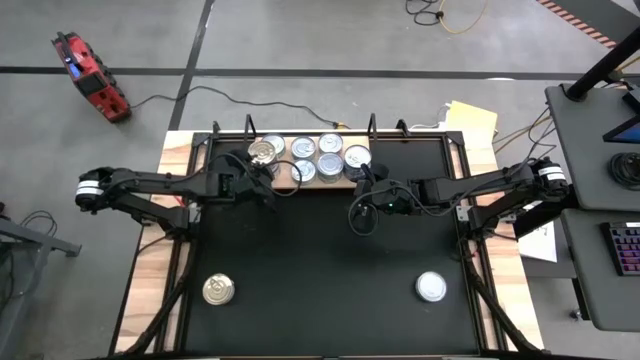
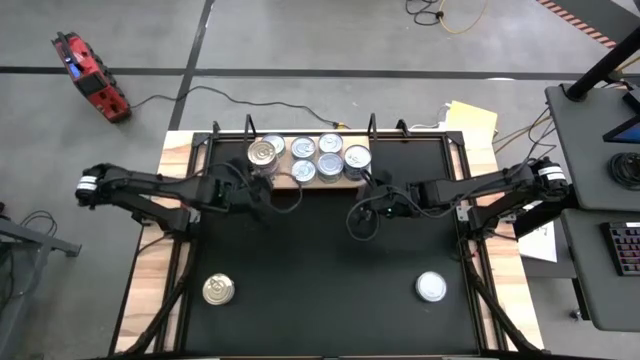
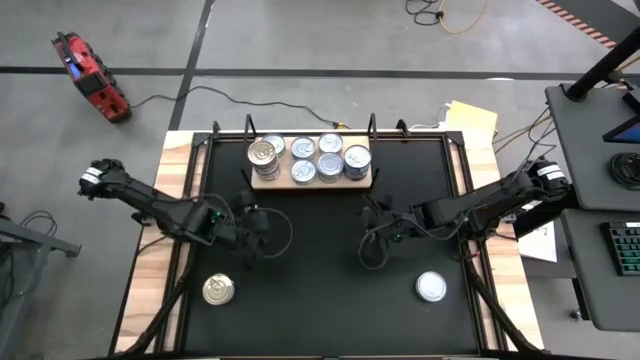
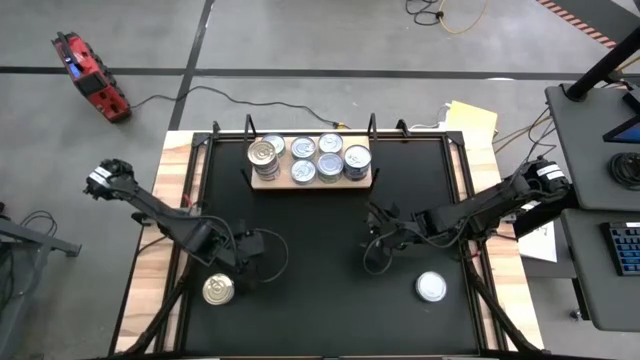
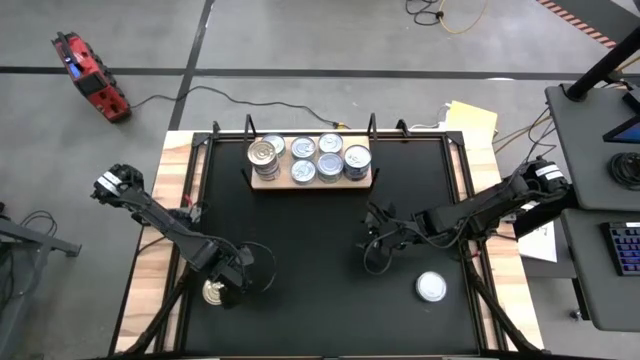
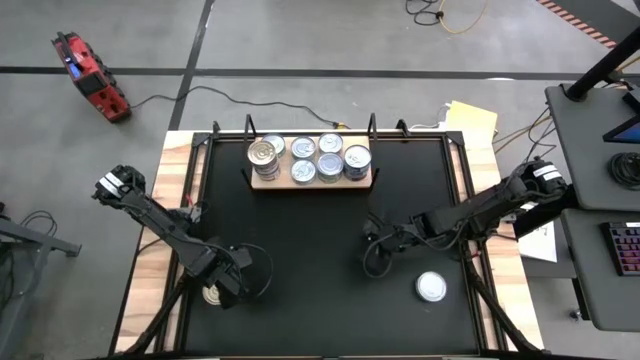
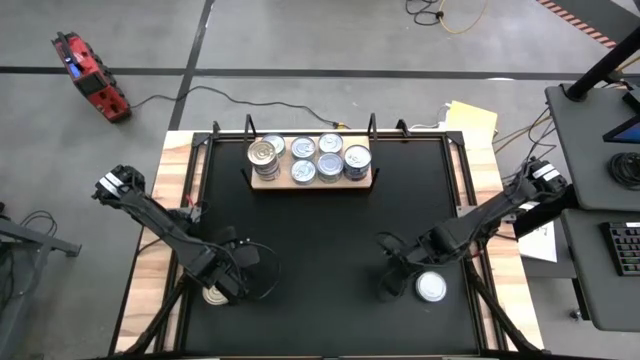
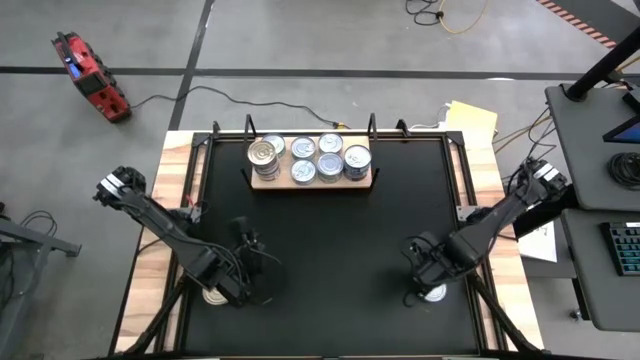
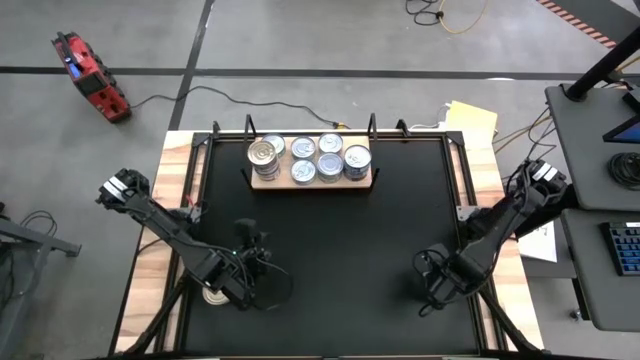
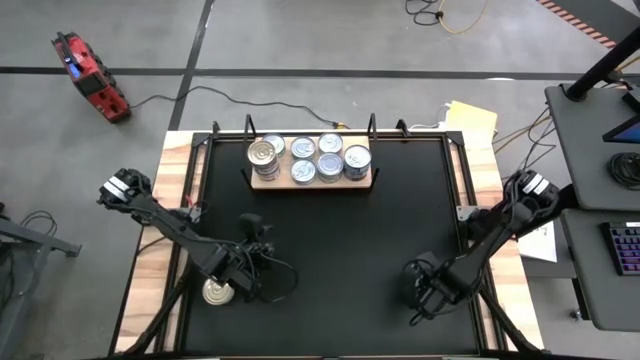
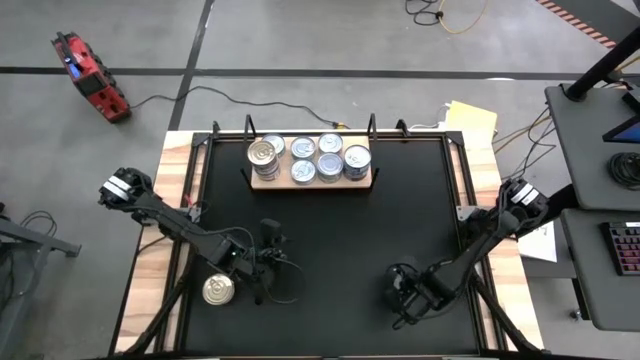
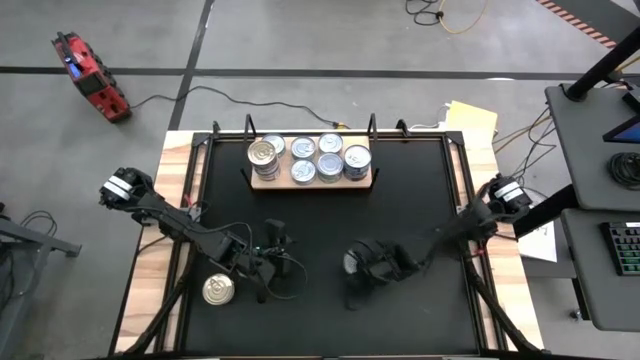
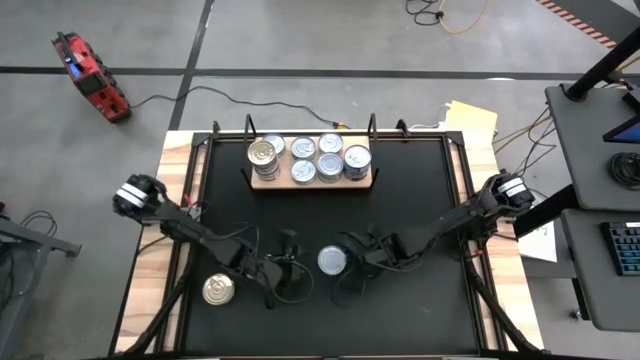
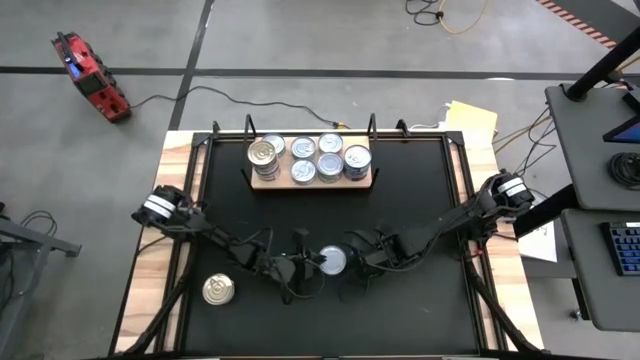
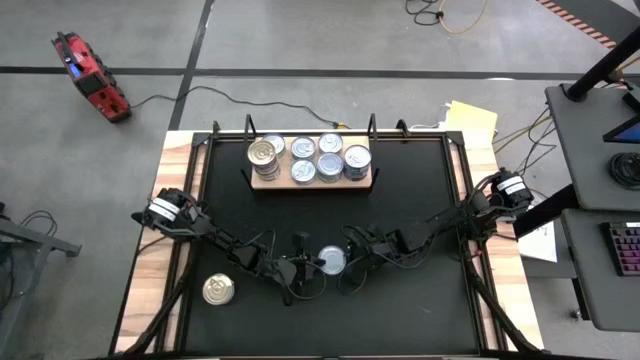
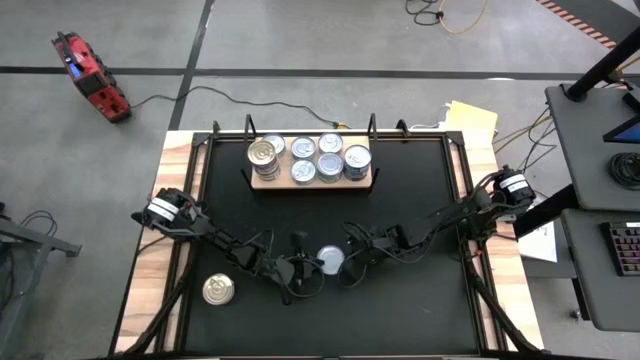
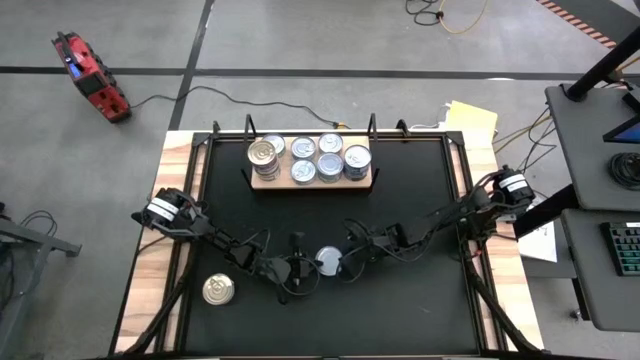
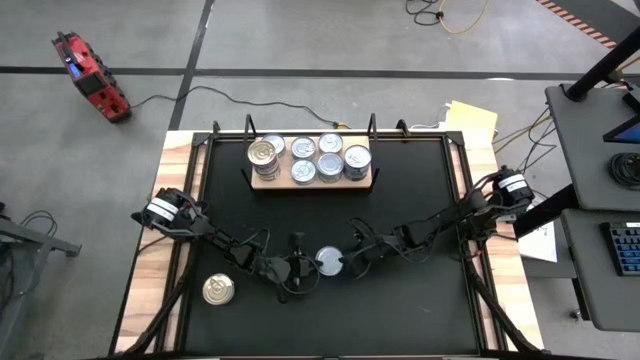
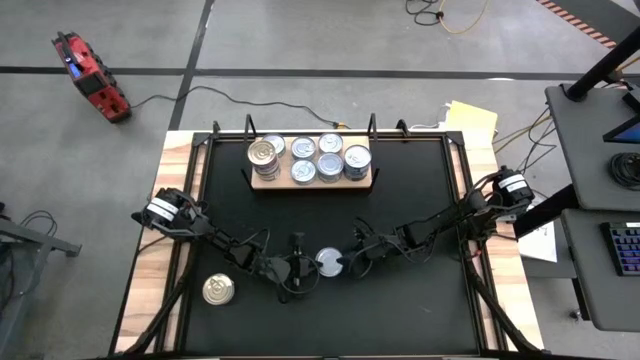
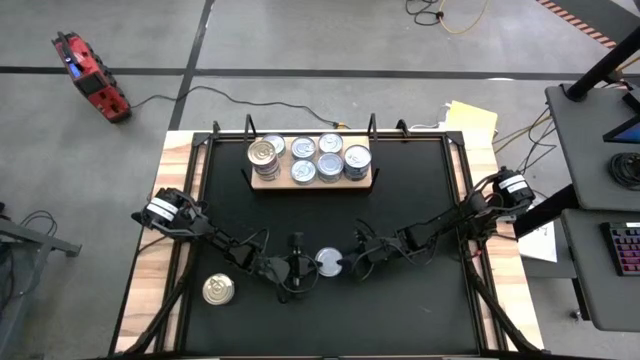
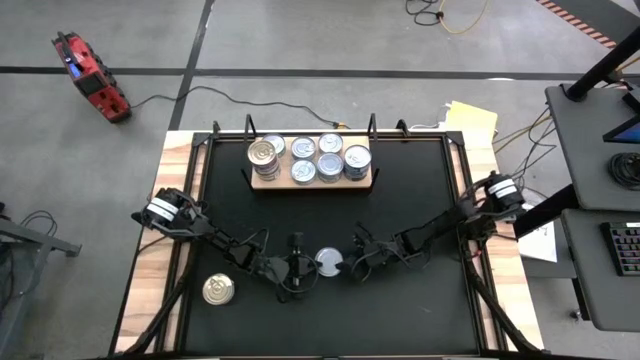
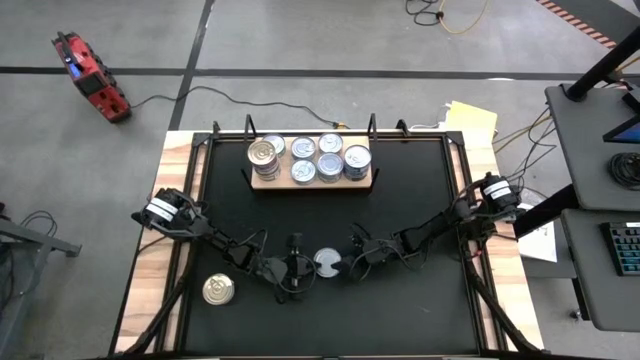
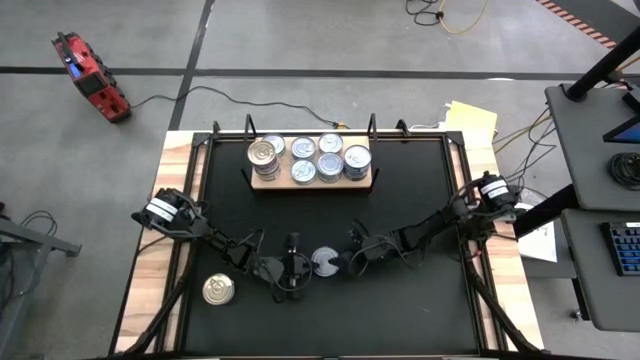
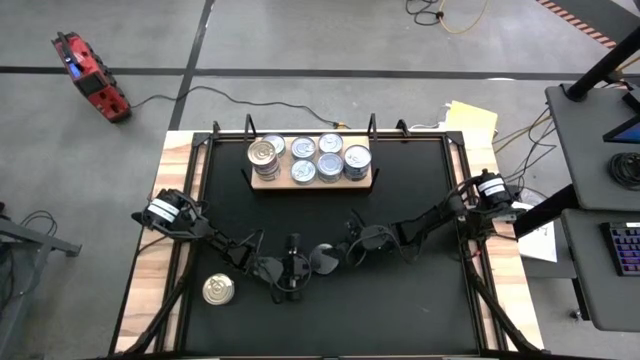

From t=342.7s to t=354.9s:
Task: Stack canned seafood by type on shelf
Stack the green tuna can on top of the other green tuna cans on the shelf

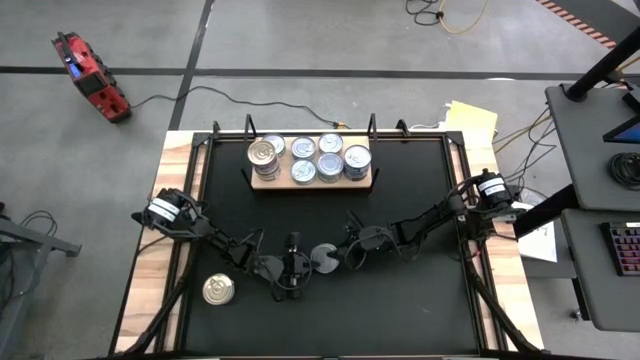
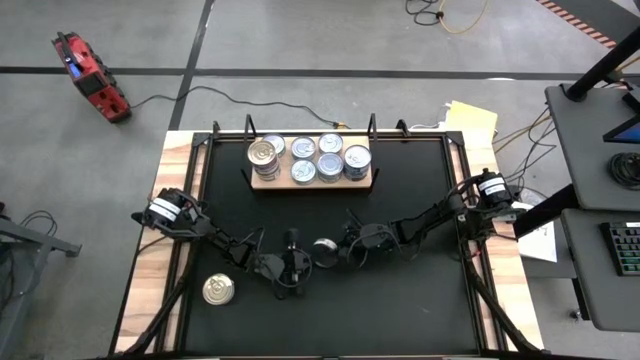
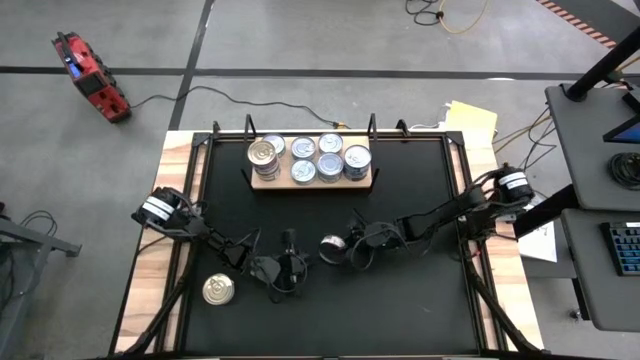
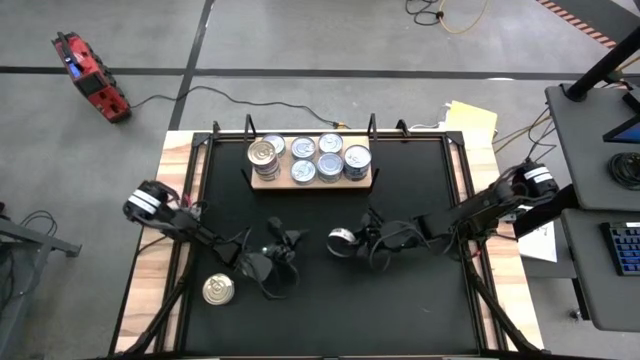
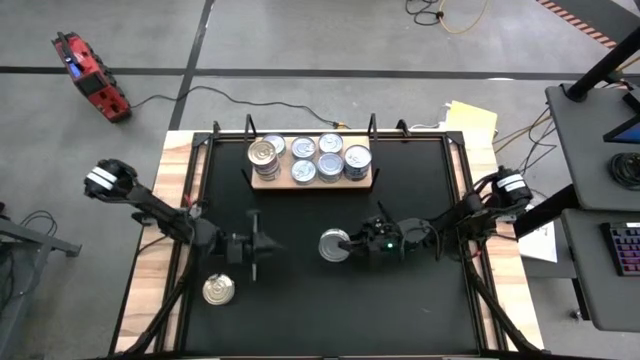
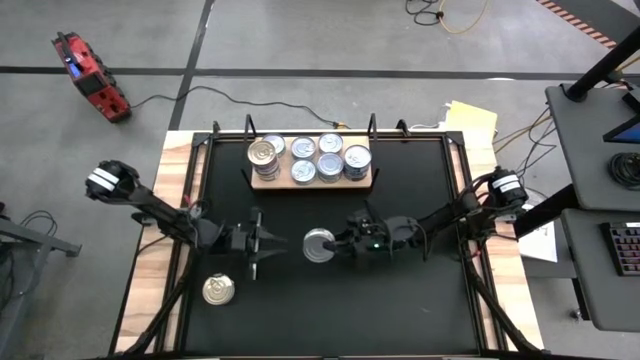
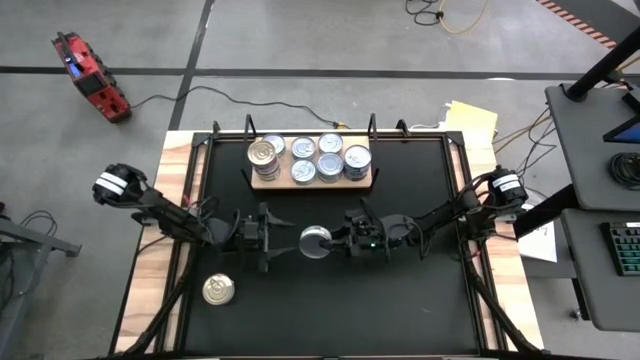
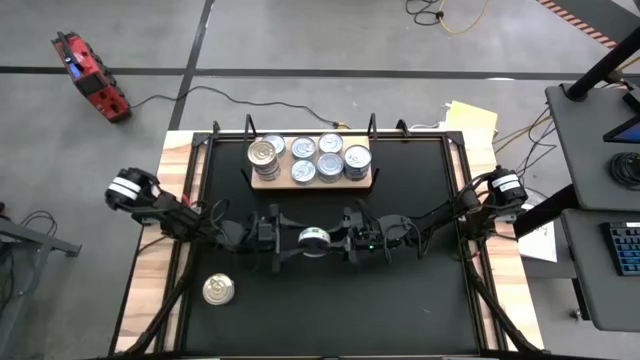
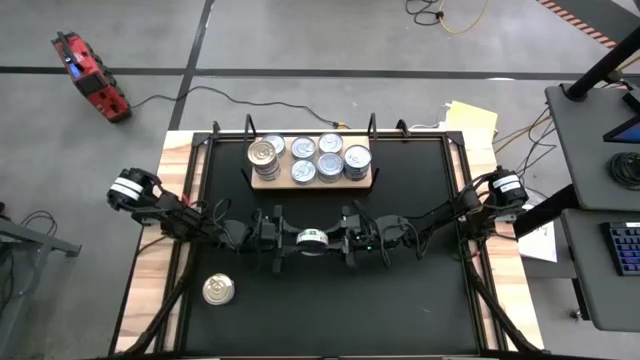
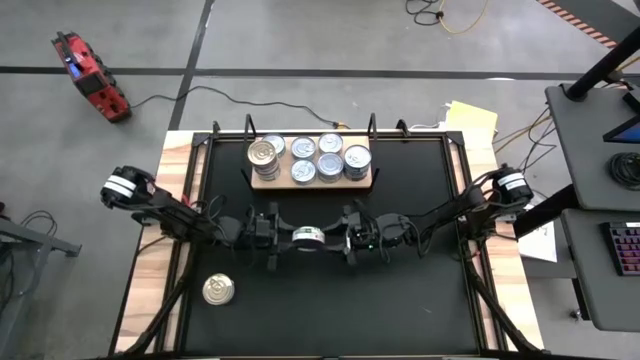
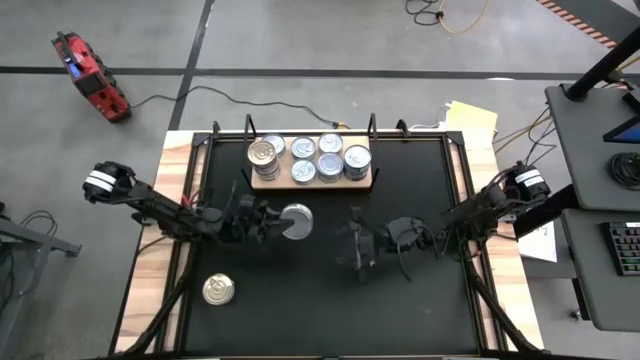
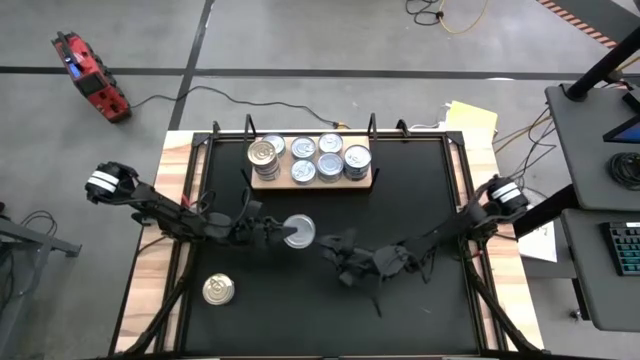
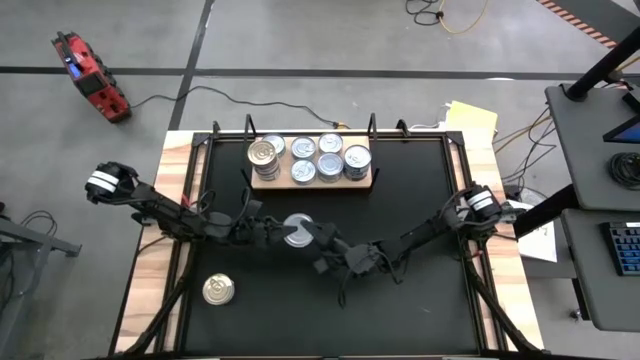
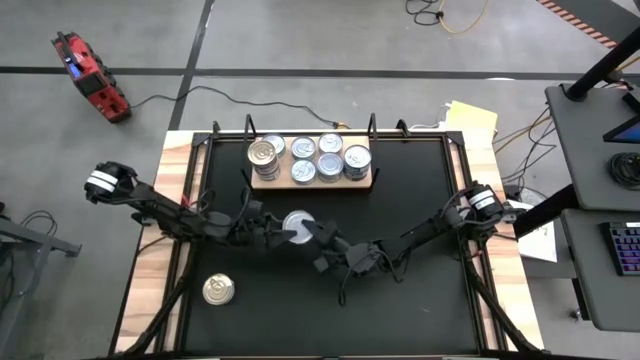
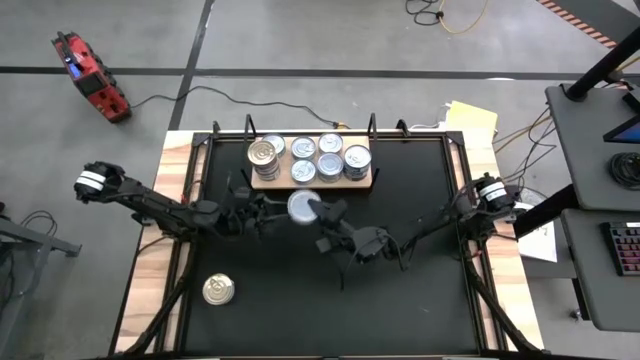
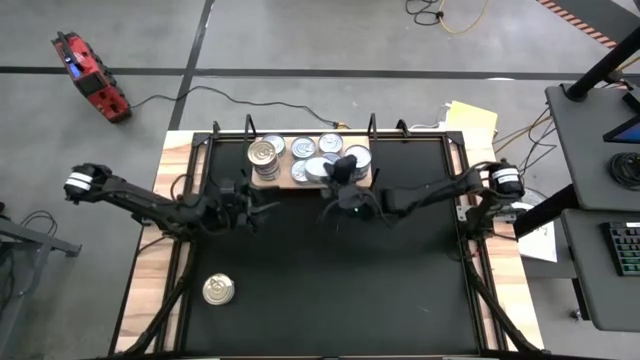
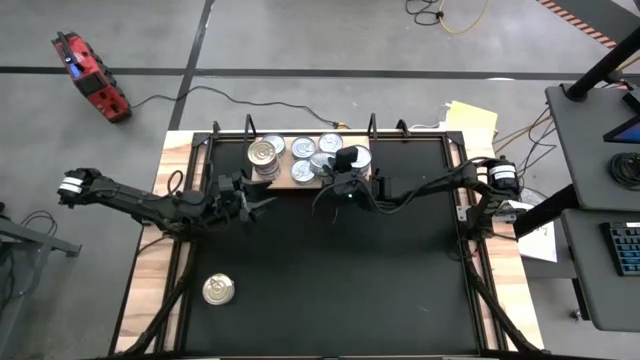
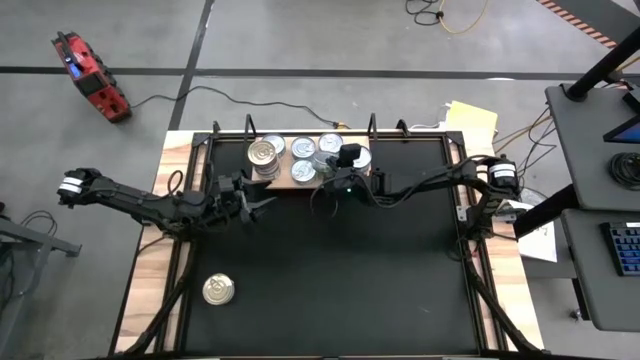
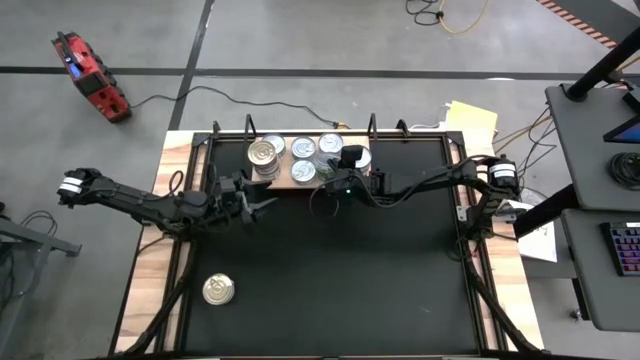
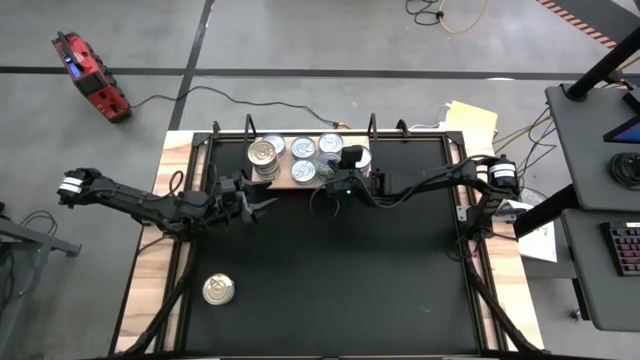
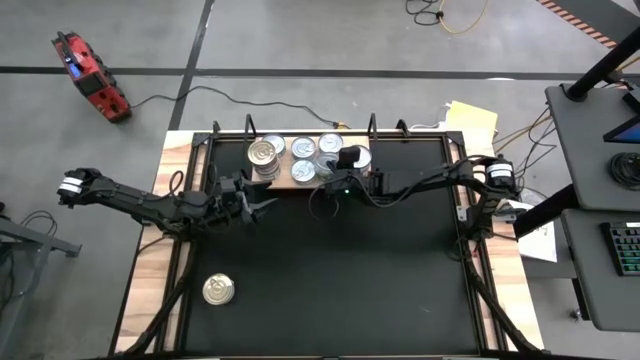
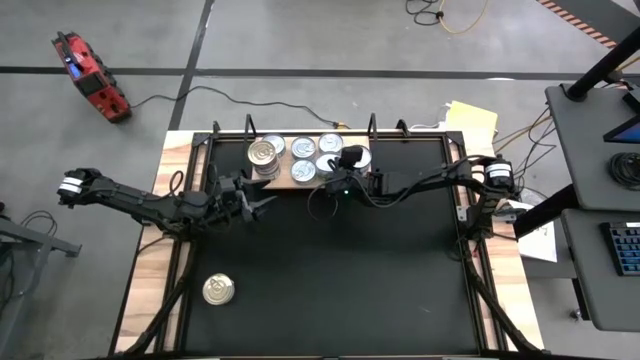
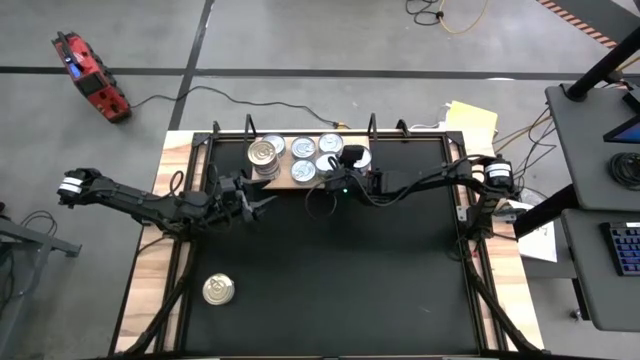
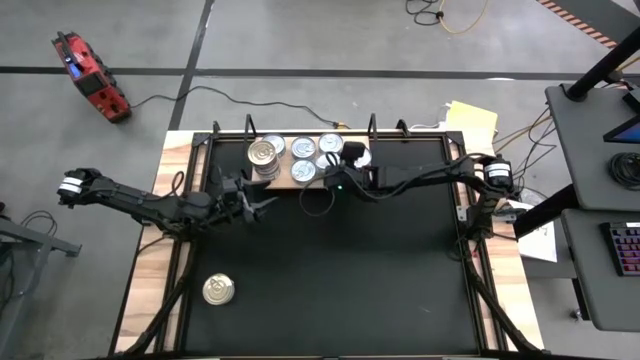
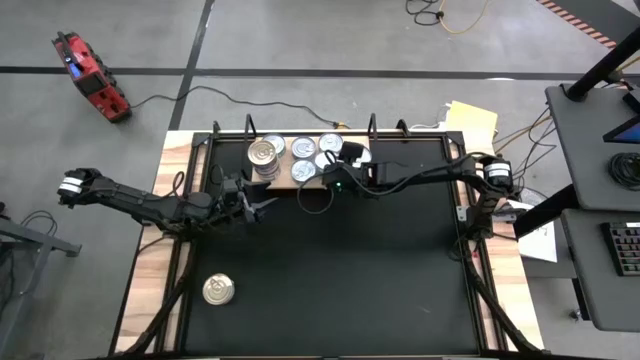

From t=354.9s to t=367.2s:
Stack the green tuna can on top of the other green tuna cans on the shelf
